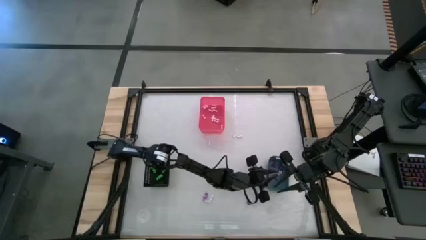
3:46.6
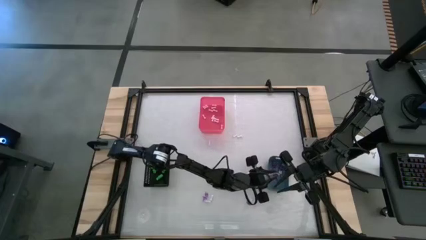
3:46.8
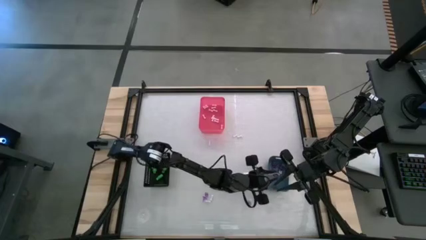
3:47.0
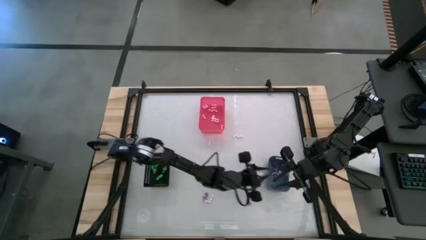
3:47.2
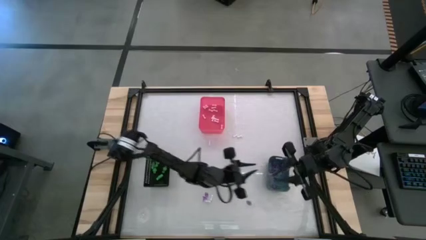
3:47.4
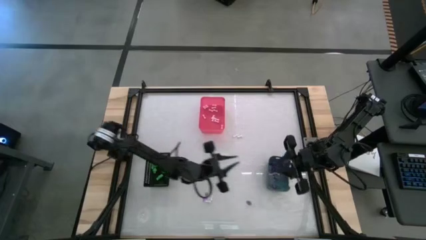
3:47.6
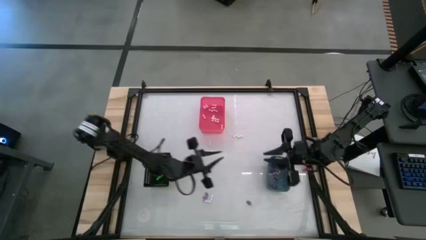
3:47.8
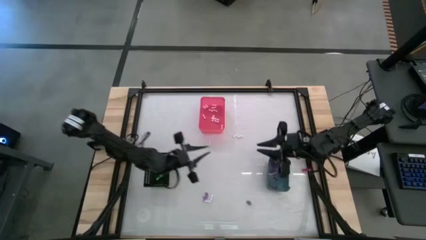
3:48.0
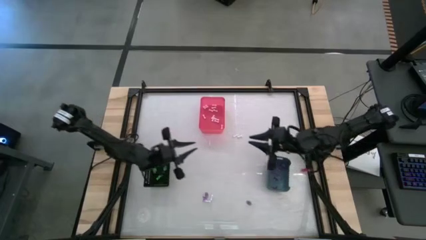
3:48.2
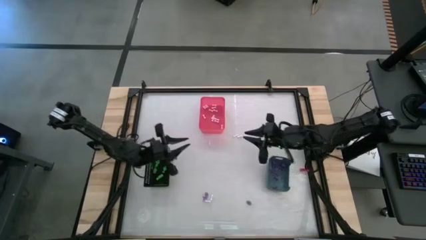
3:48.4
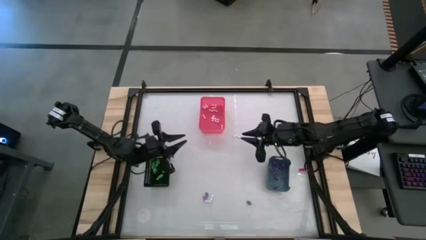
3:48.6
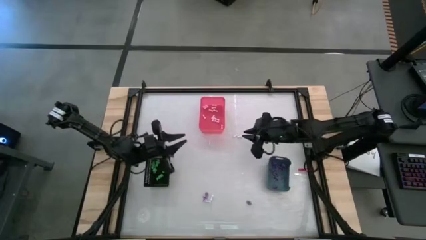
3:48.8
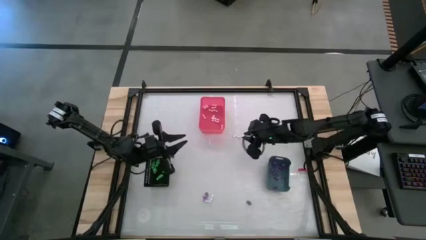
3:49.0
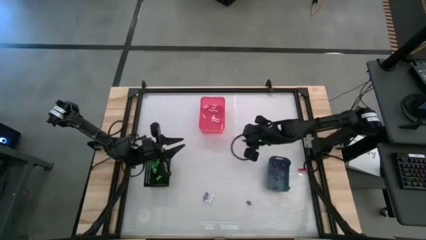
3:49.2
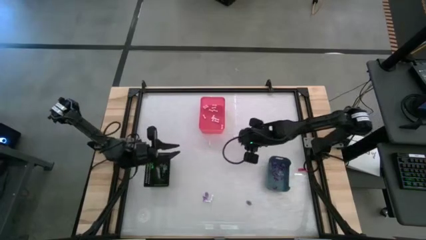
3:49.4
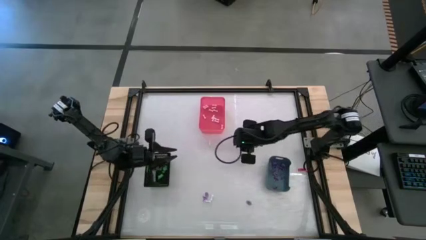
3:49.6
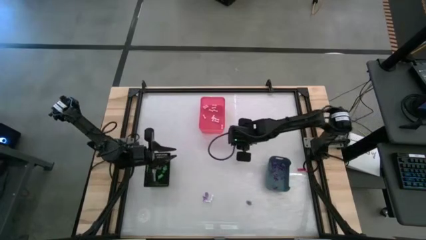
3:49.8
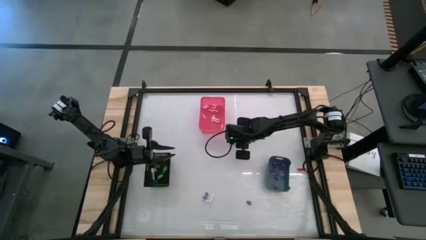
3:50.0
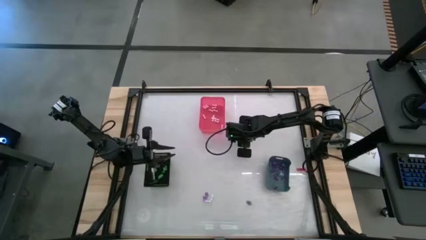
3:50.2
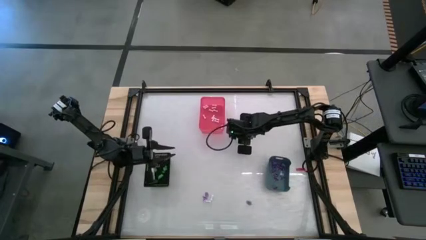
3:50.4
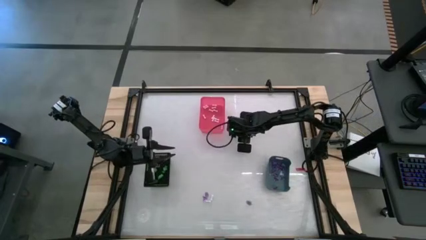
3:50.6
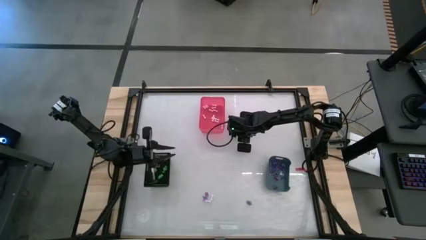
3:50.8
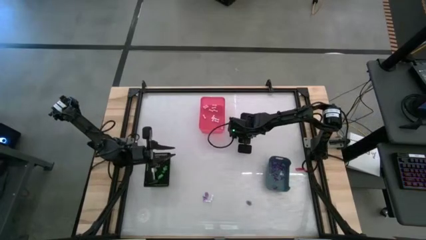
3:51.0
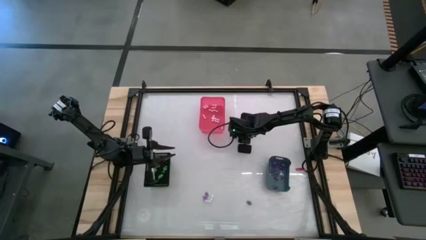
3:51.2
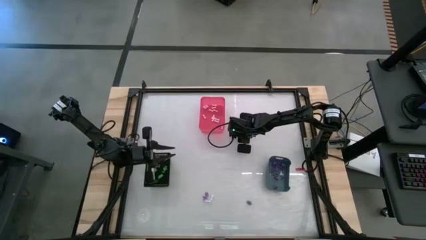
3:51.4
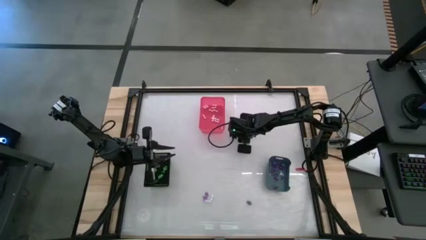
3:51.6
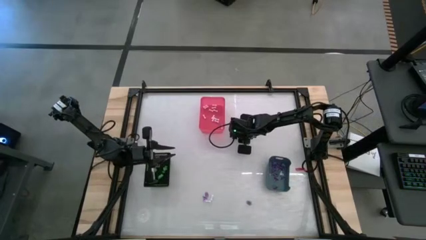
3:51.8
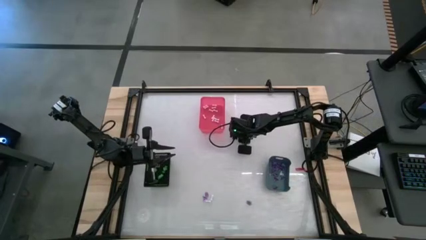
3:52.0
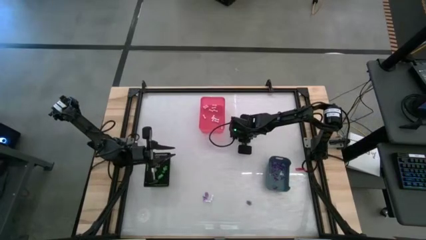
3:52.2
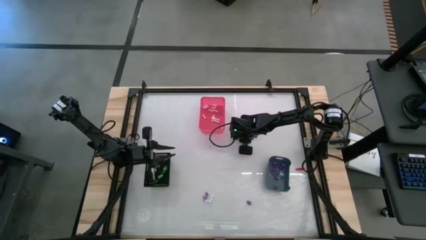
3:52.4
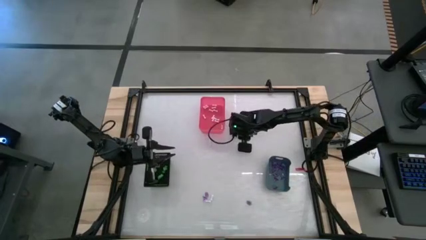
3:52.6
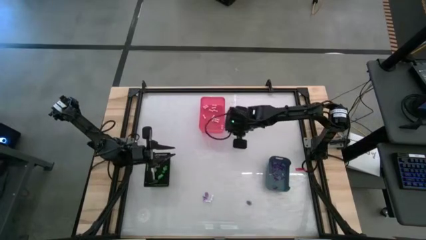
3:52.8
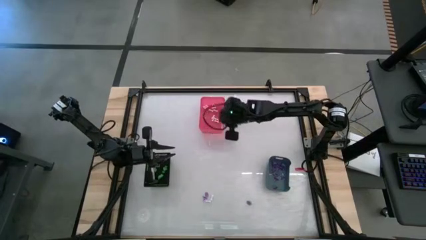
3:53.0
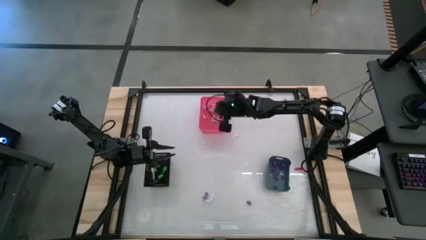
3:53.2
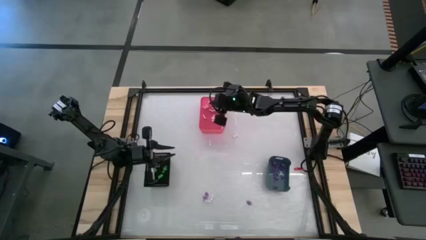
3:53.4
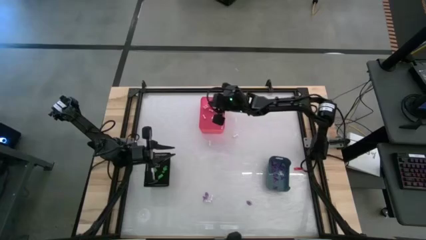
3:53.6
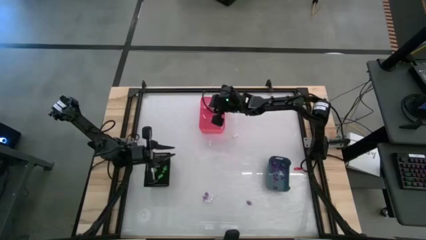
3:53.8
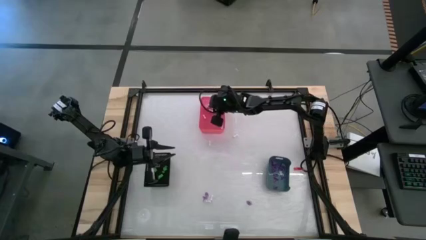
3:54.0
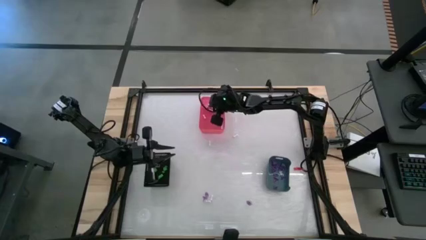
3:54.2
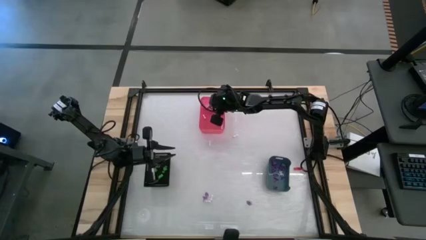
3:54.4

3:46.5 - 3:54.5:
Task: Sort Halloween decoration
Put the bone toy into the red bin

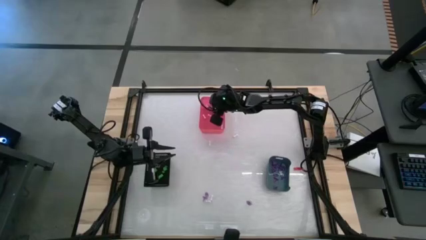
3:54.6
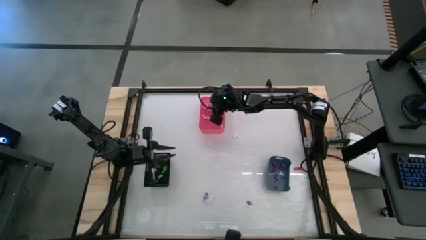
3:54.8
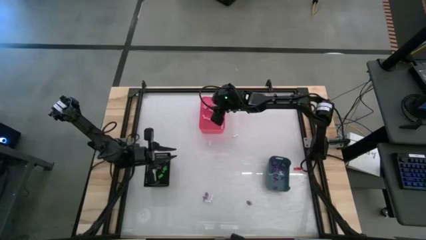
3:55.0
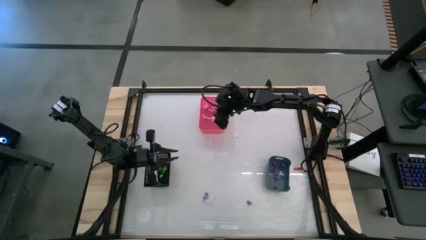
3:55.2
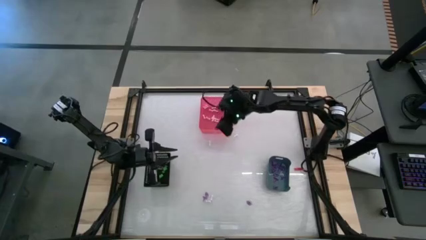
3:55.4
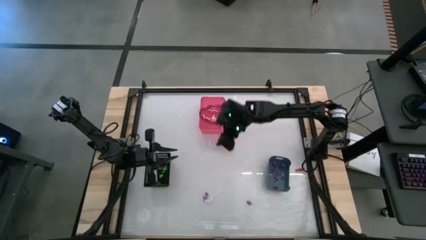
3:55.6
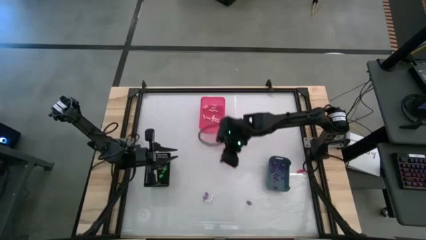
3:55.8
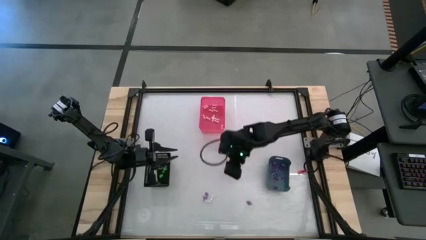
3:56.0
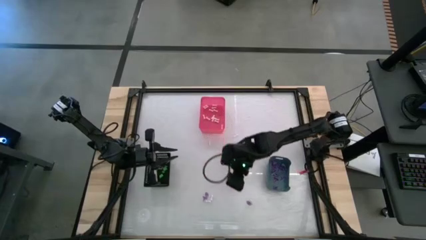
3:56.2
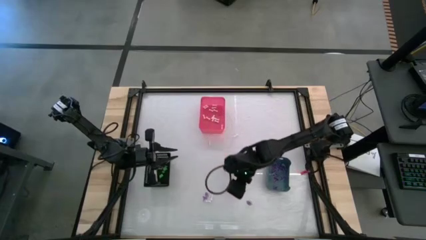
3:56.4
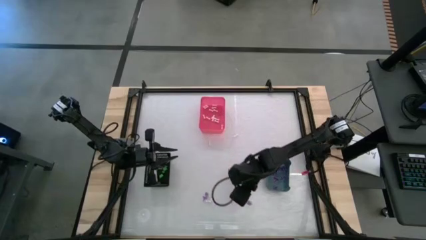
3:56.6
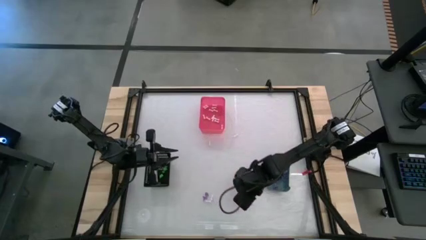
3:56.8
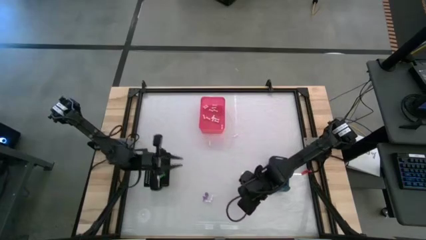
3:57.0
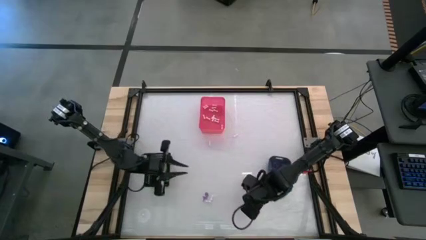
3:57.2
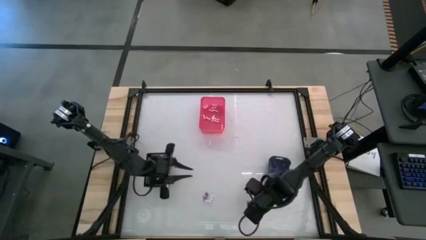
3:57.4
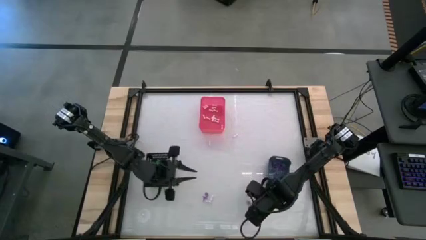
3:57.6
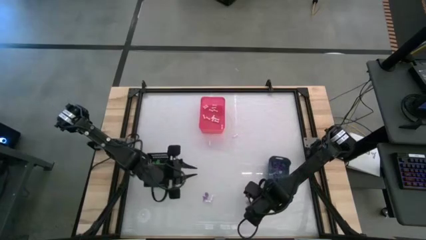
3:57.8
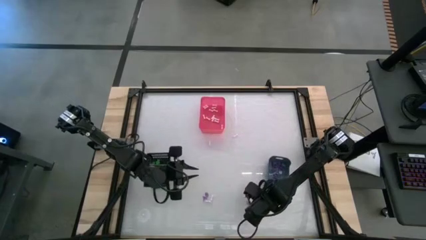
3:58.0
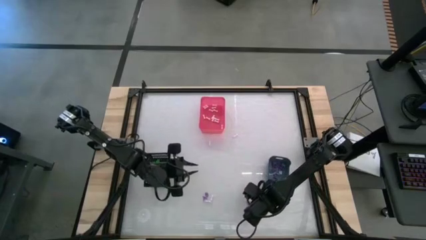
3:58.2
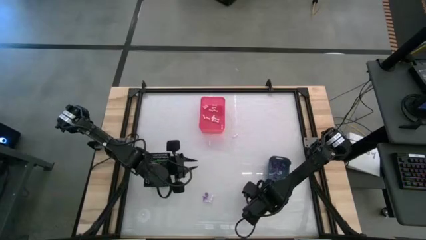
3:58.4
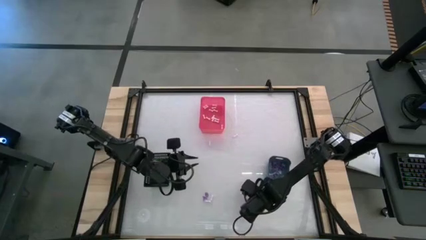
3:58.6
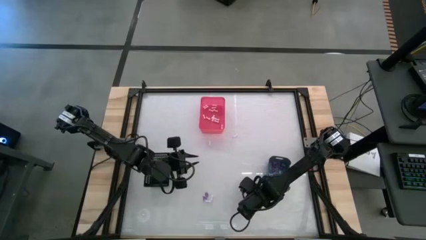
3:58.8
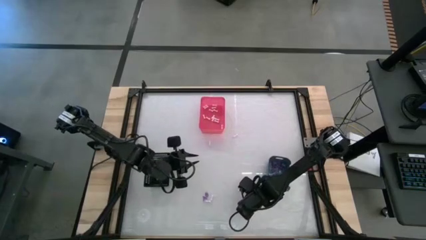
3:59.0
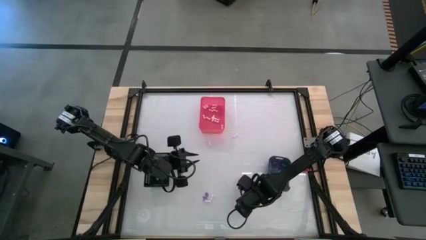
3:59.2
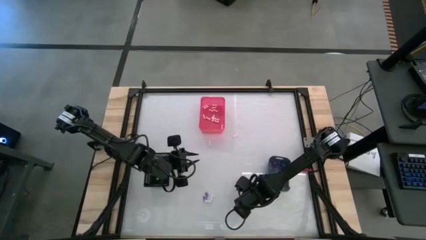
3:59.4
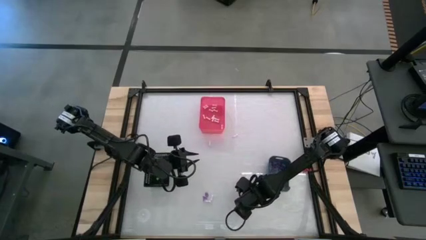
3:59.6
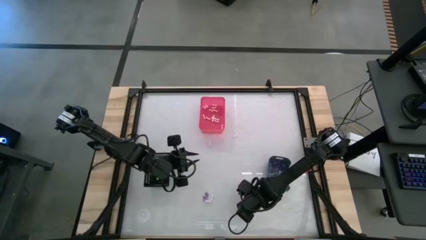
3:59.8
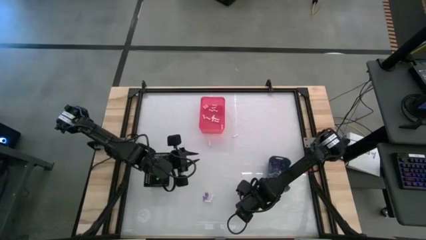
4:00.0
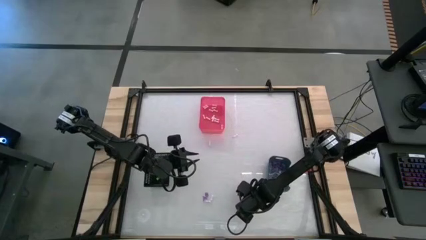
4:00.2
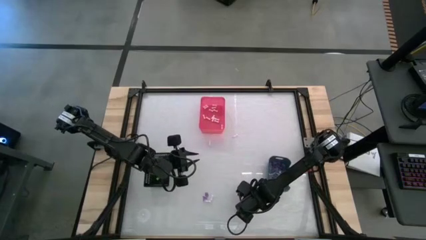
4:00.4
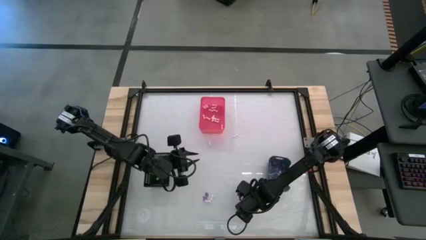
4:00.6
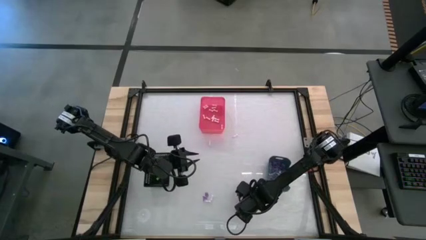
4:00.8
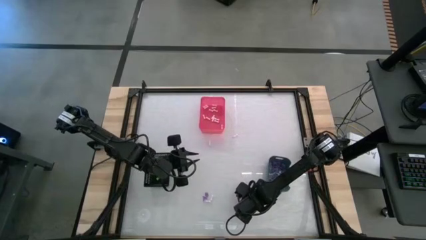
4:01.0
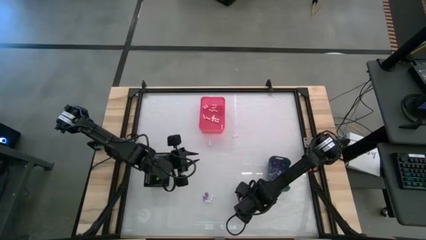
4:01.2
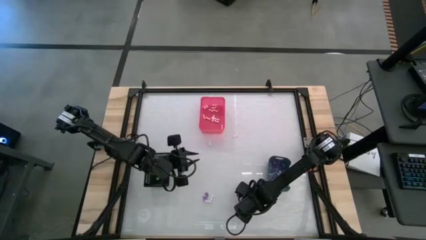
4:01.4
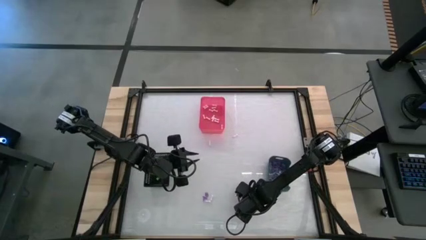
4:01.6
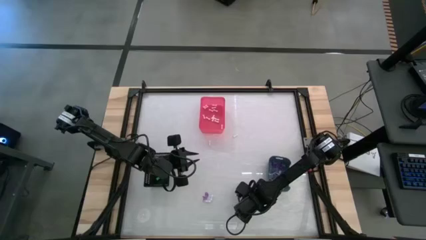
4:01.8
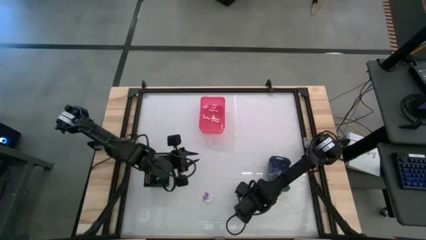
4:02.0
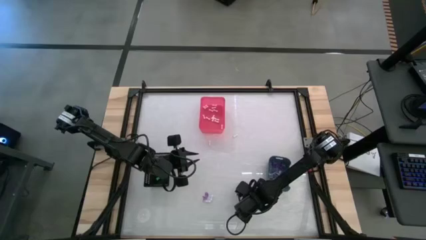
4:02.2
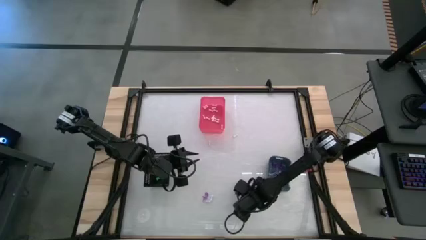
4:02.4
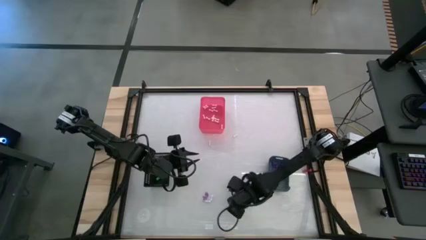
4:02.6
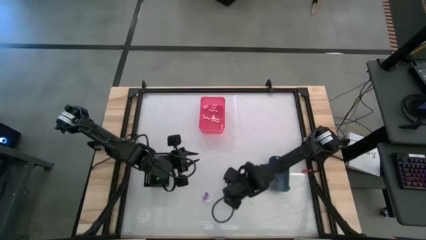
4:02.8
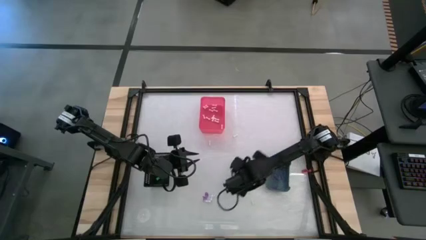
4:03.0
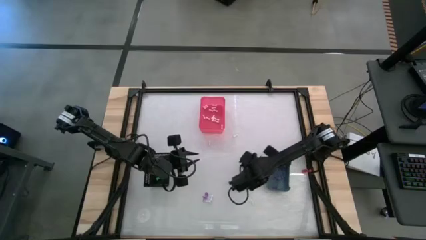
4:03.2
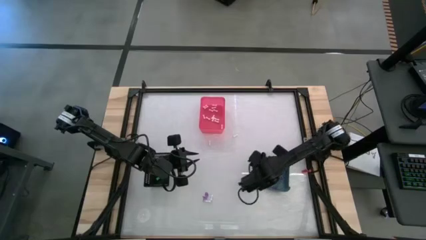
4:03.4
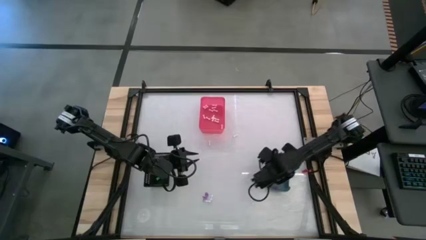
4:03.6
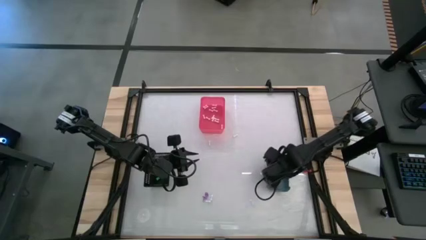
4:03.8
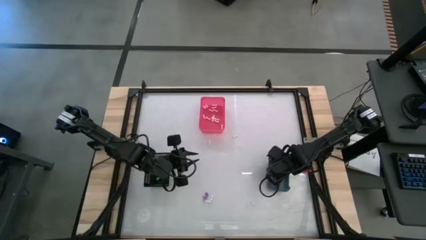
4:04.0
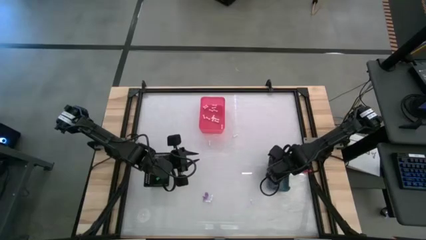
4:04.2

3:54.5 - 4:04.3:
Put the witch hat toy into the blue bin
